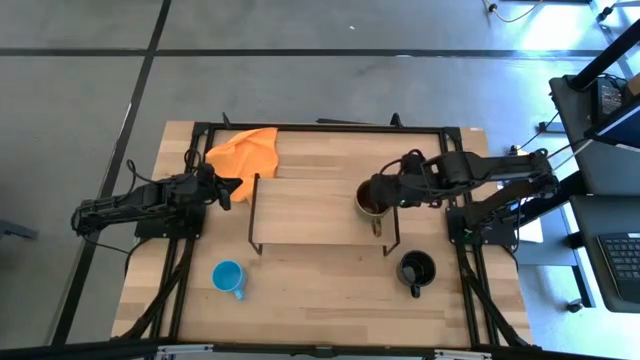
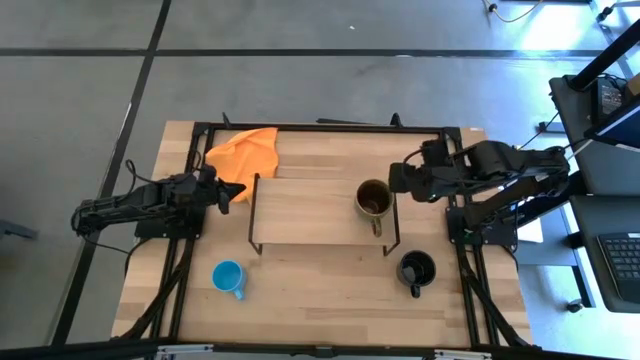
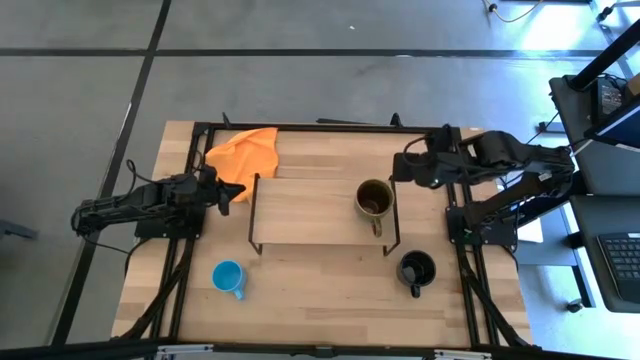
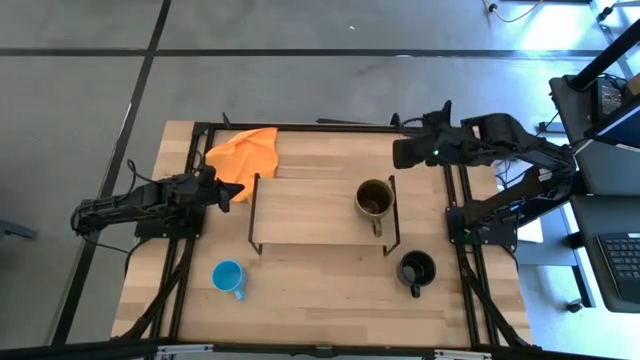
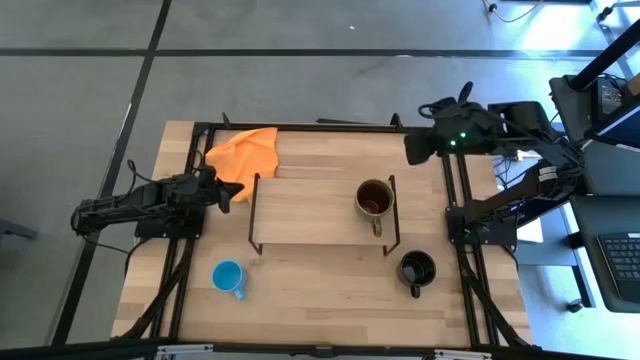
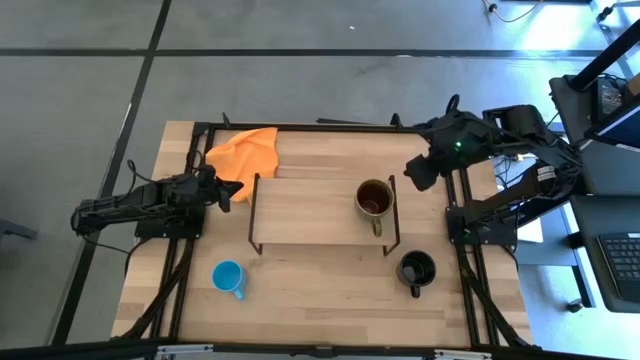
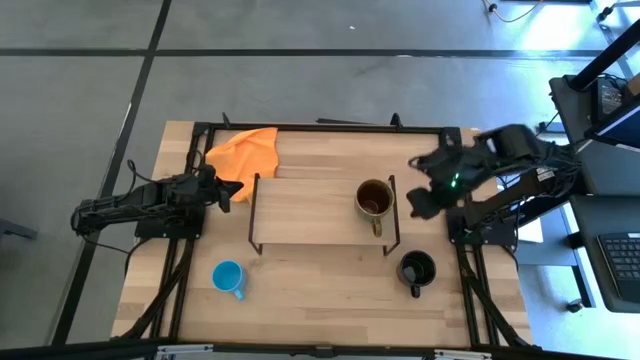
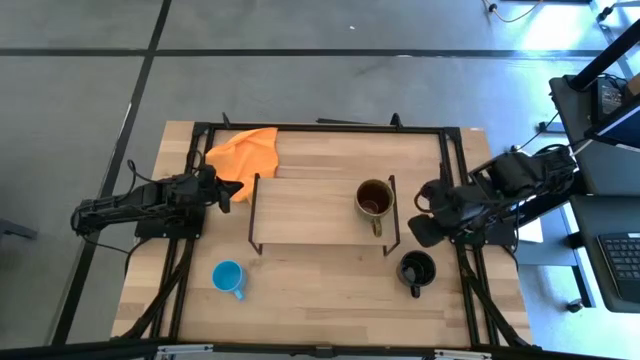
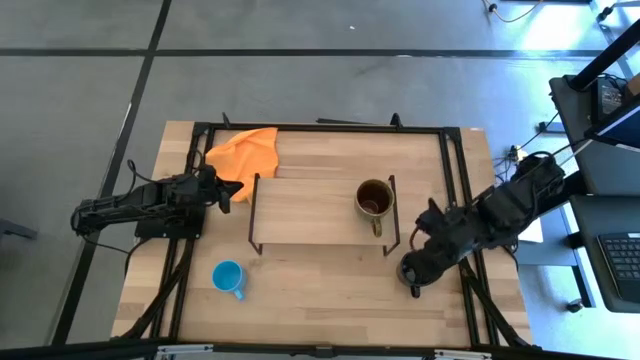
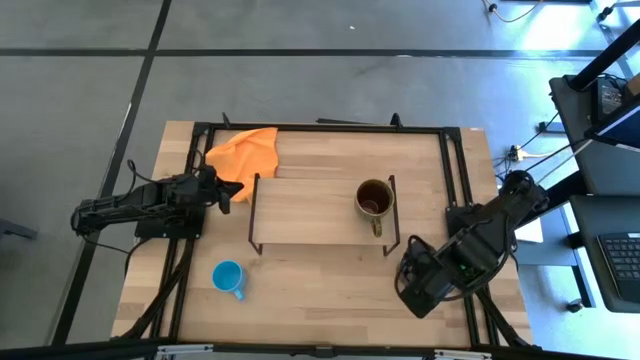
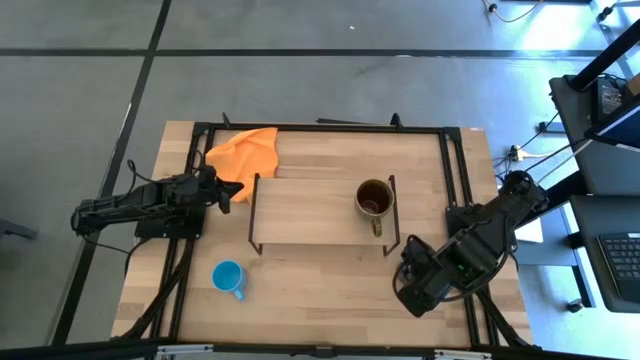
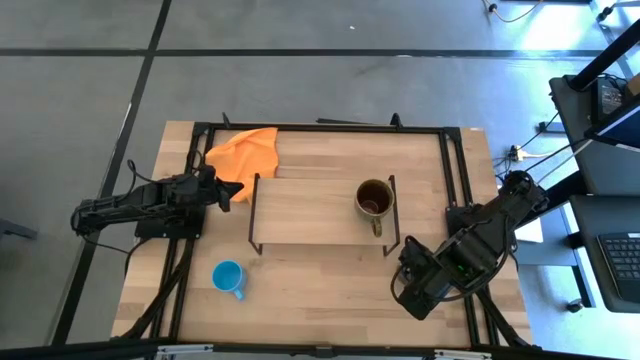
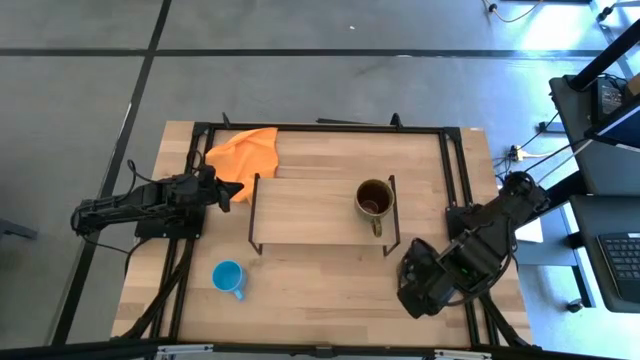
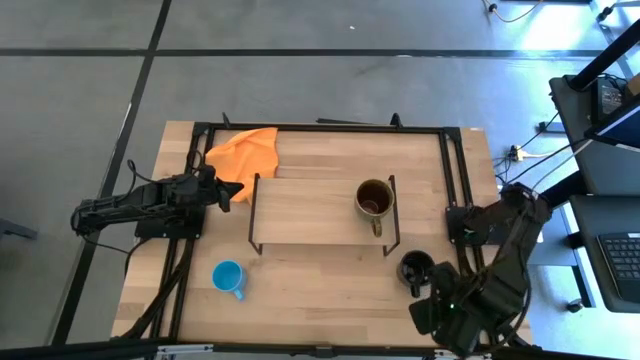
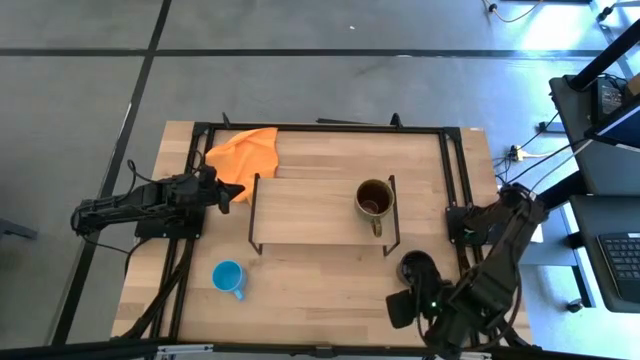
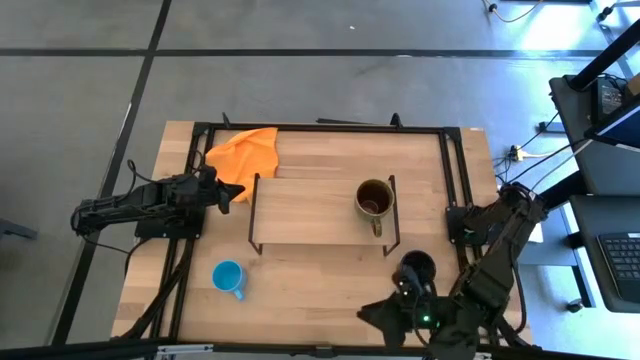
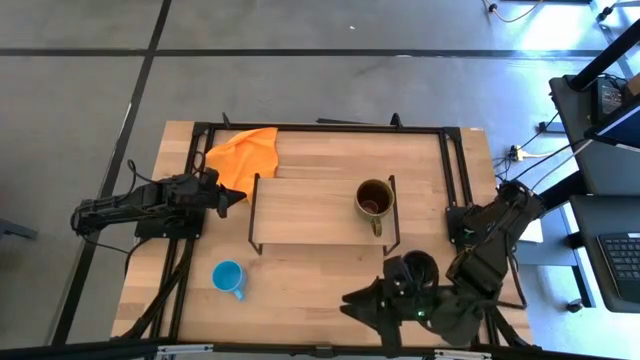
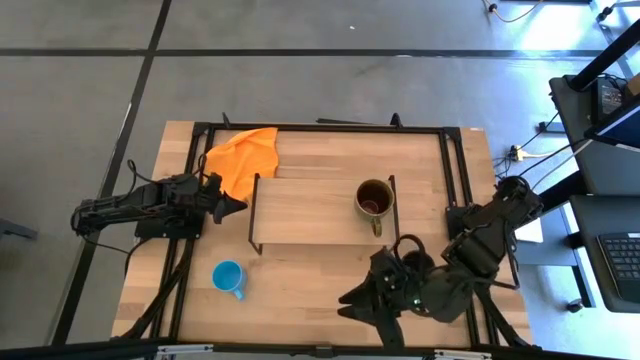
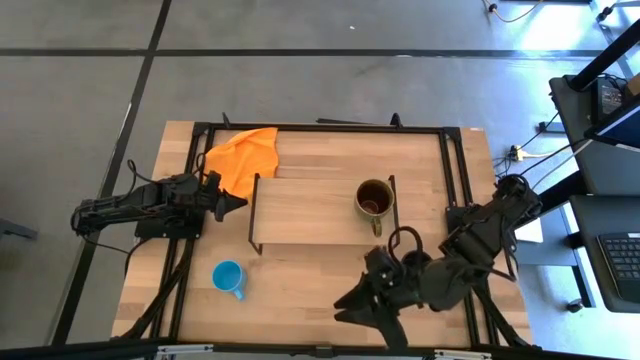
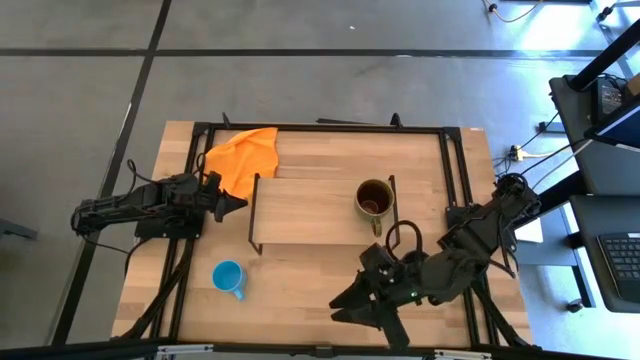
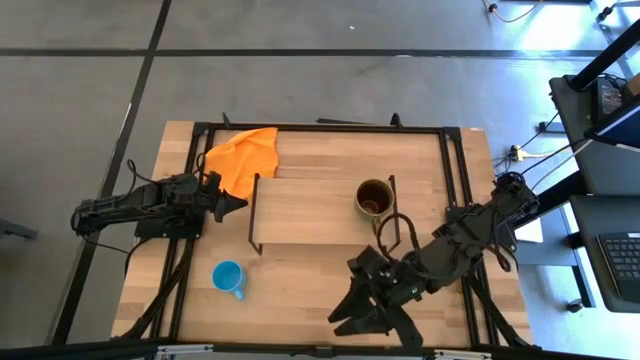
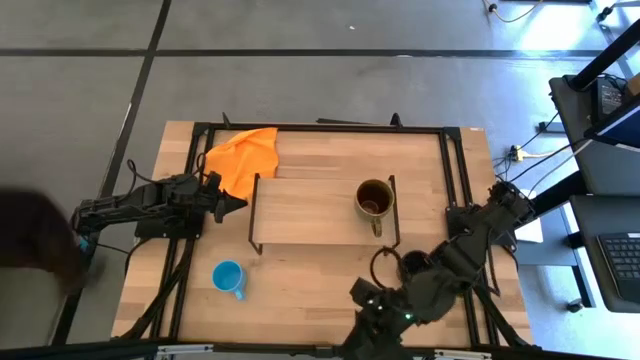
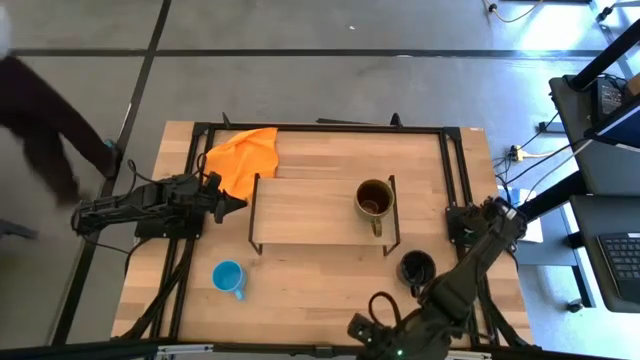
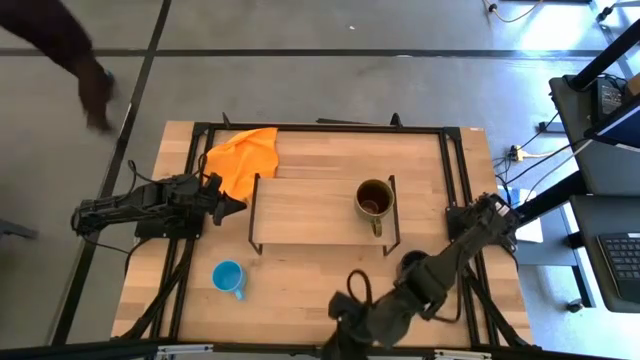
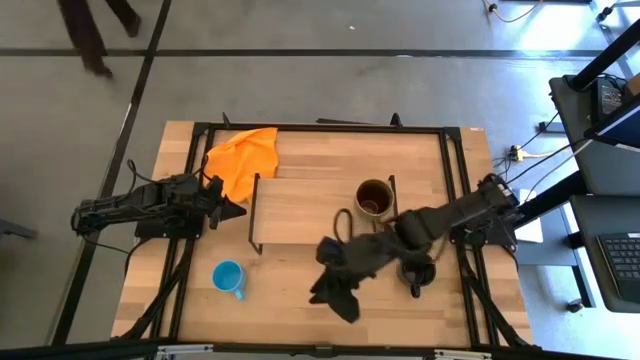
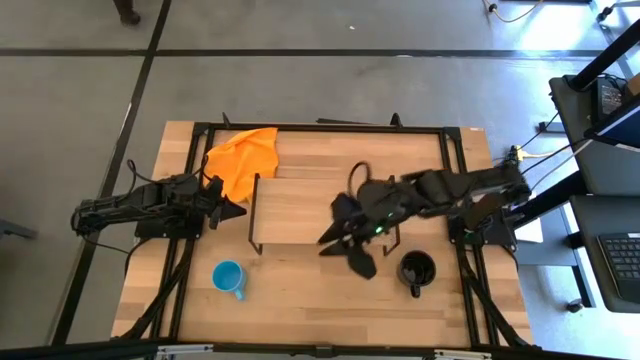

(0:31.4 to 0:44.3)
Task: Stack small to large cups/mugs on shelf
Put the dark blue mug on the shelf

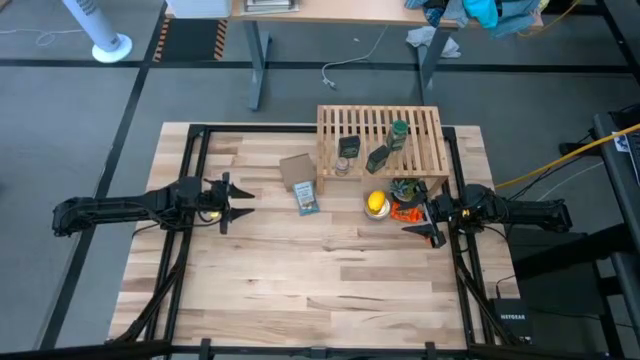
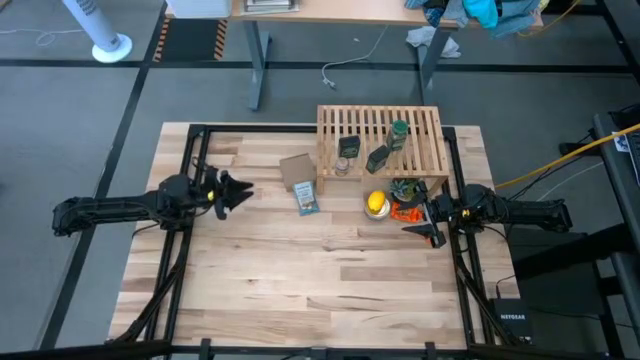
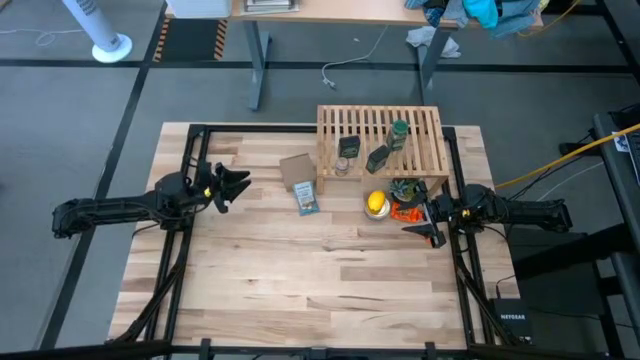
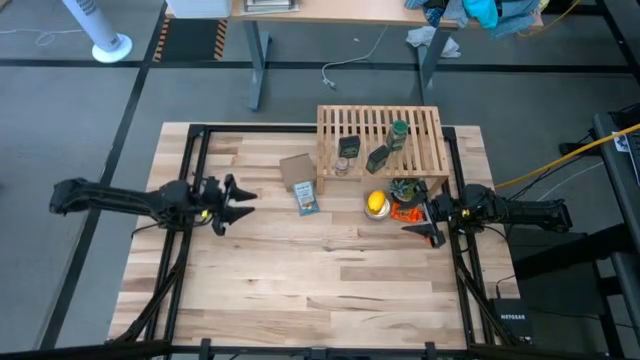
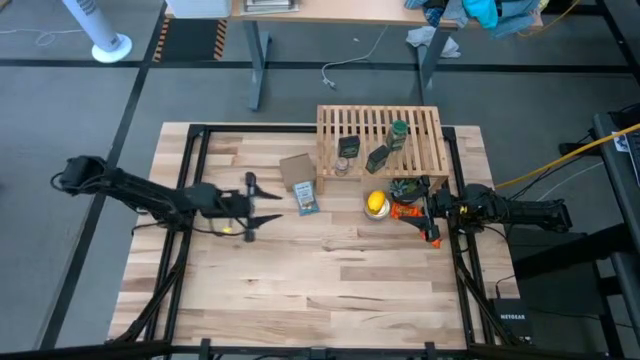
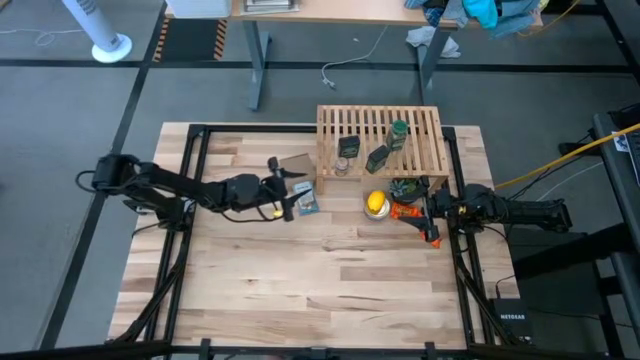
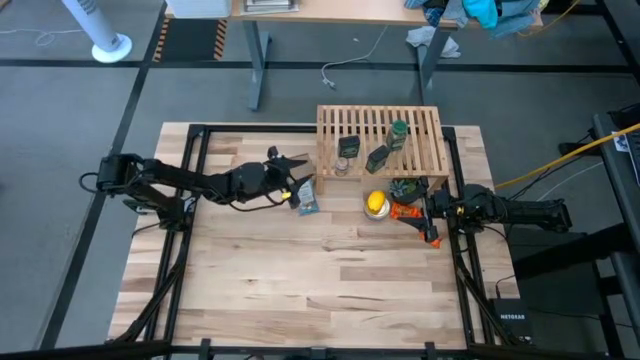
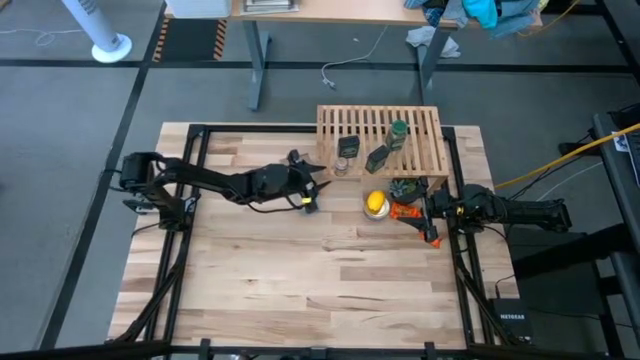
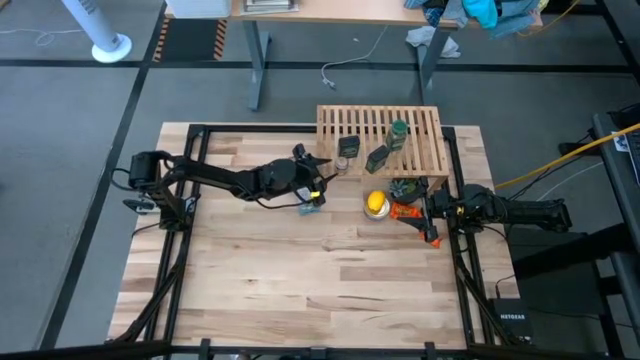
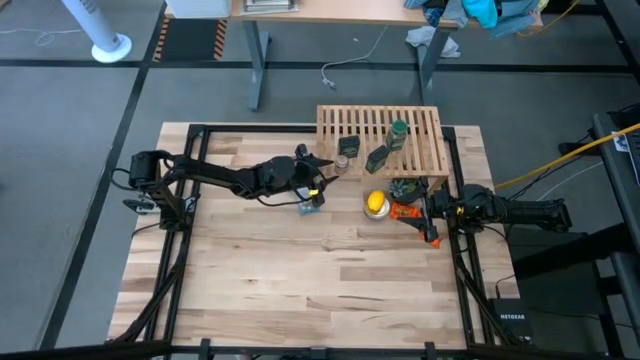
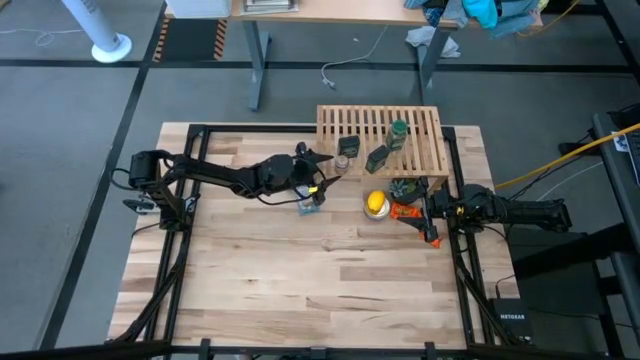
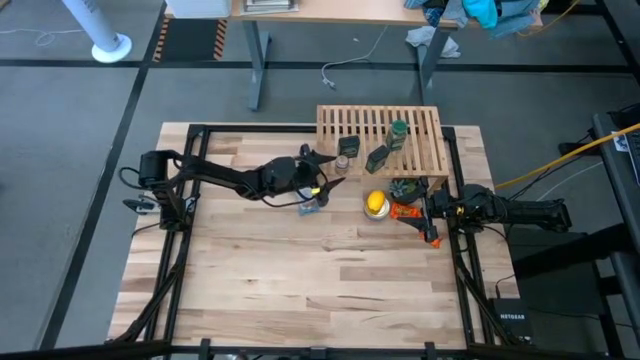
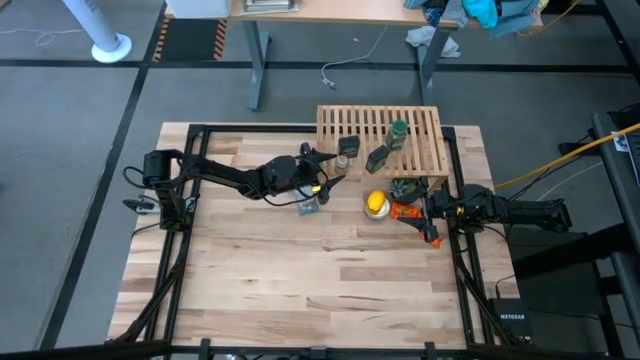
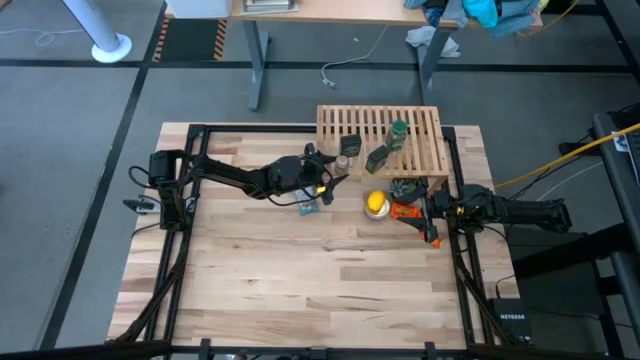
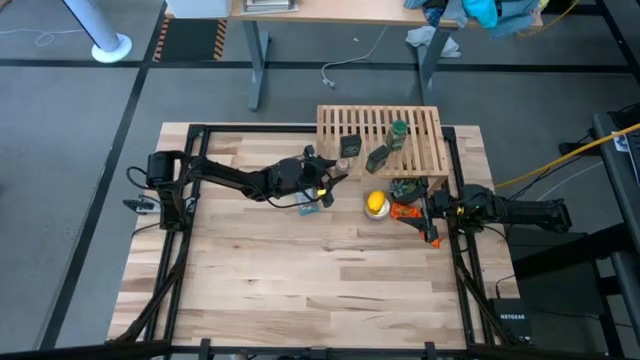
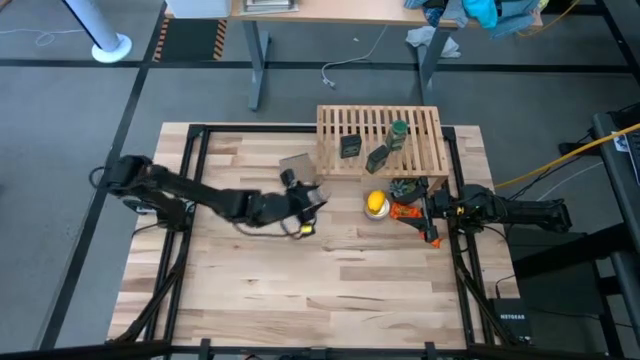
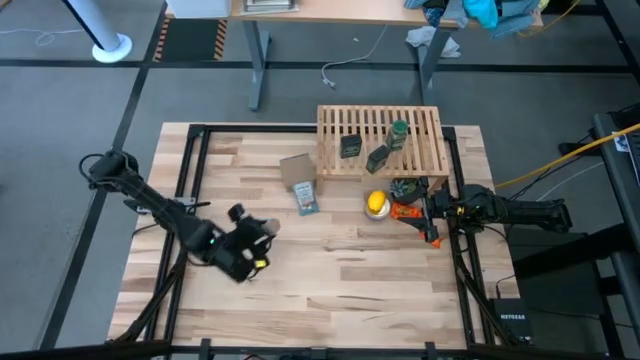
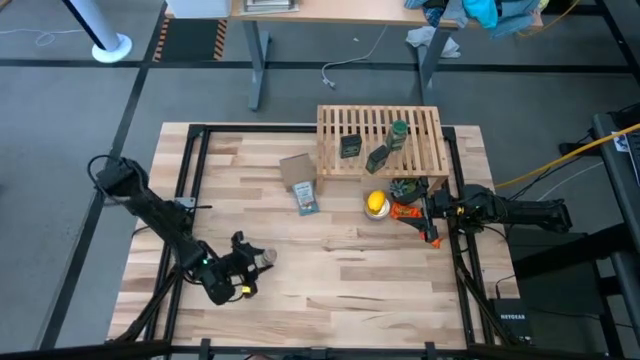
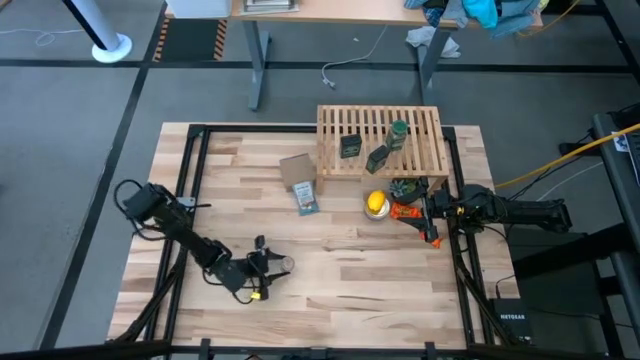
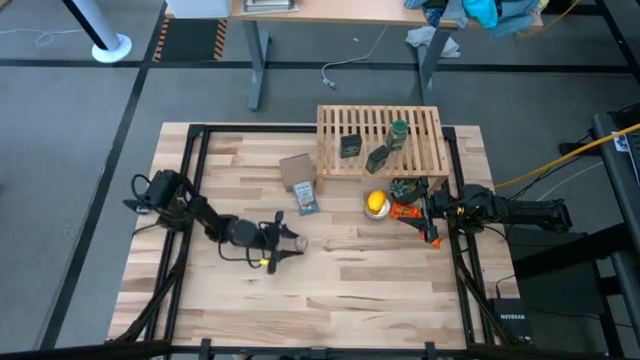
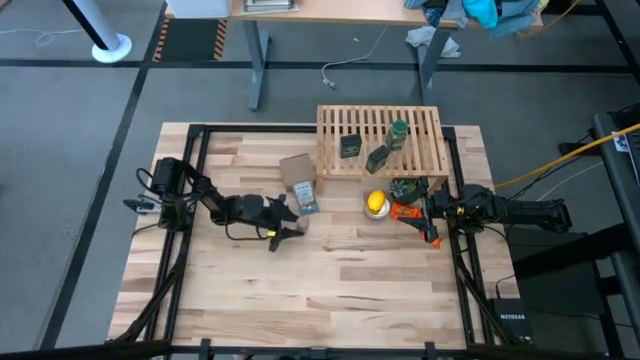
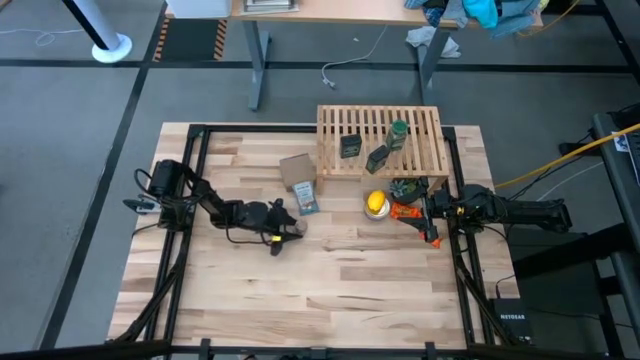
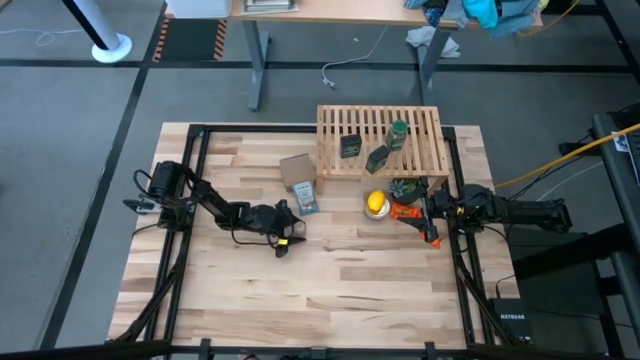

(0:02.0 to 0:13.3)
Task: Shelf spices
Remove the brown seasoning bottle from the shelf
